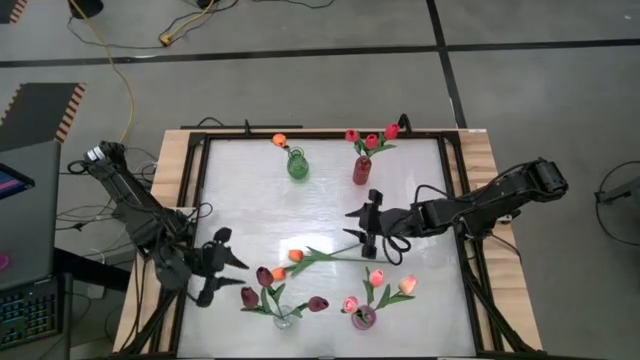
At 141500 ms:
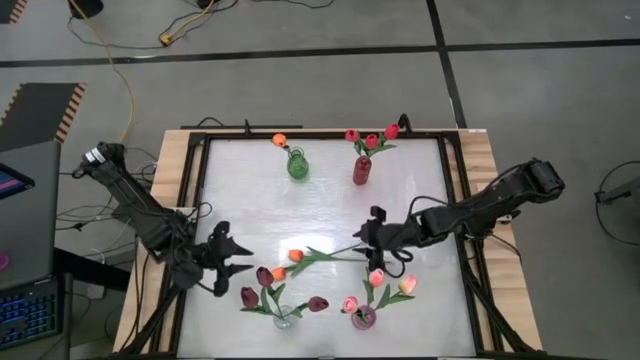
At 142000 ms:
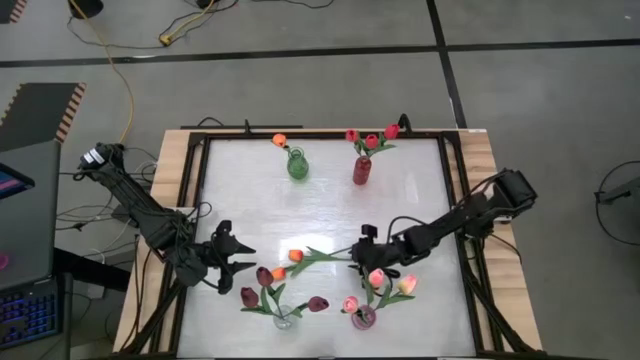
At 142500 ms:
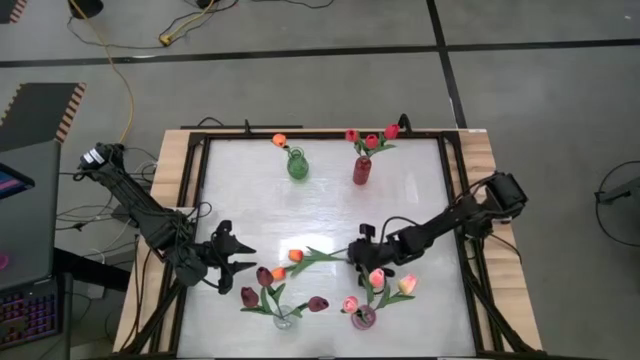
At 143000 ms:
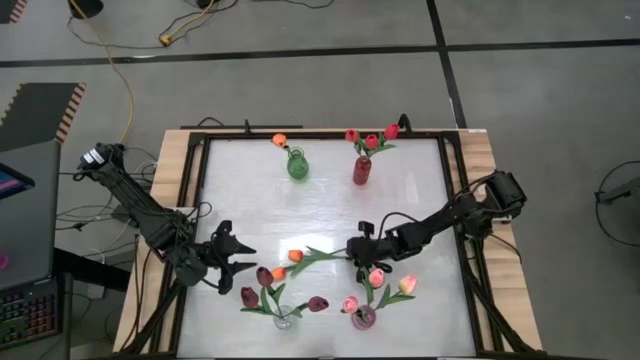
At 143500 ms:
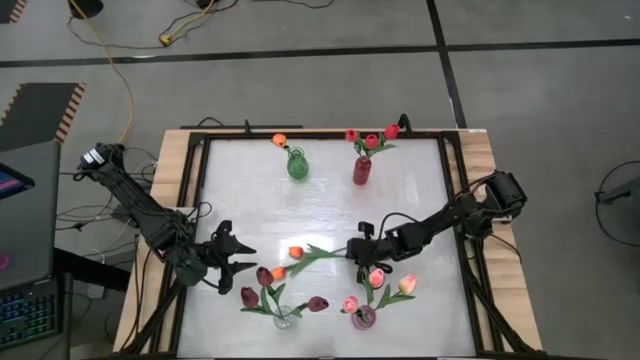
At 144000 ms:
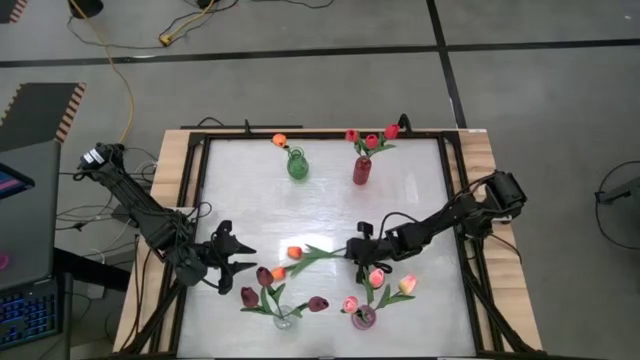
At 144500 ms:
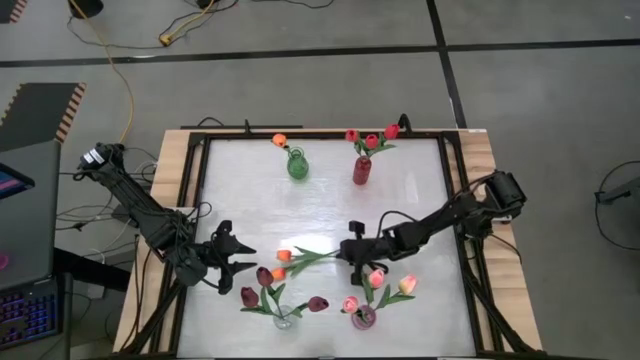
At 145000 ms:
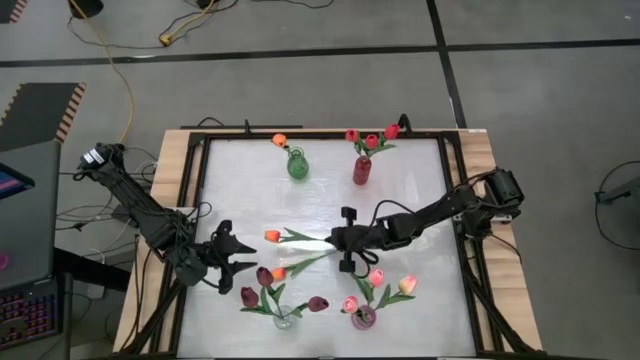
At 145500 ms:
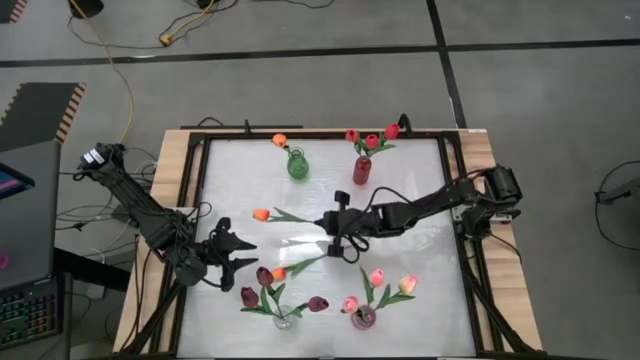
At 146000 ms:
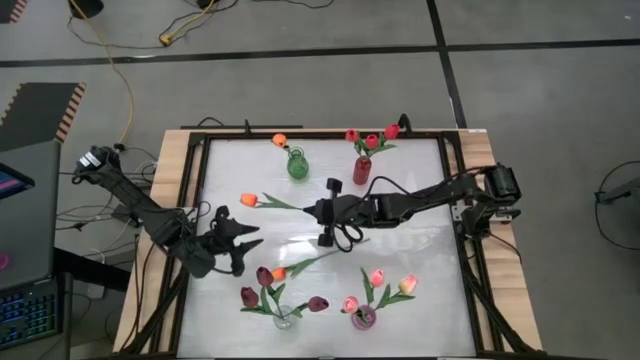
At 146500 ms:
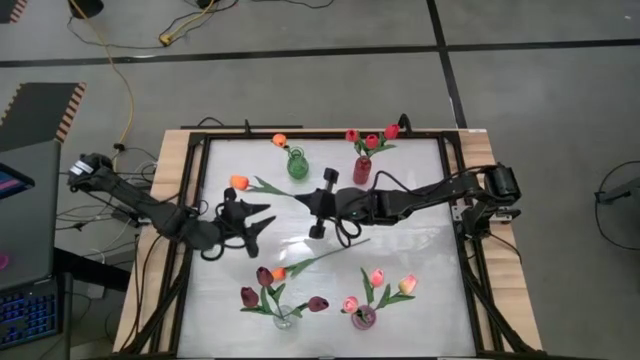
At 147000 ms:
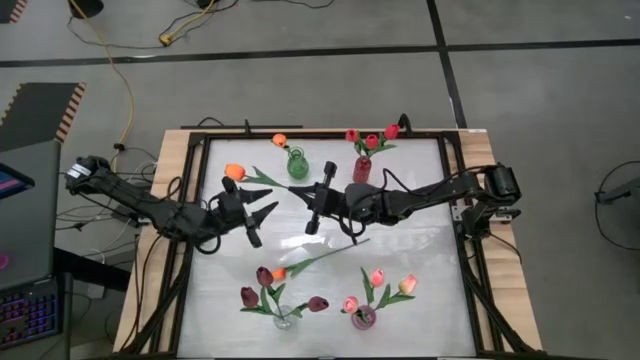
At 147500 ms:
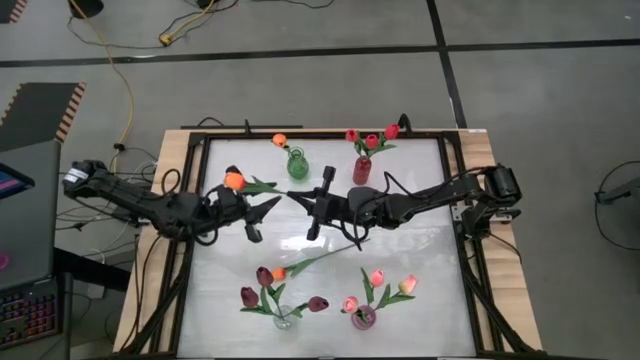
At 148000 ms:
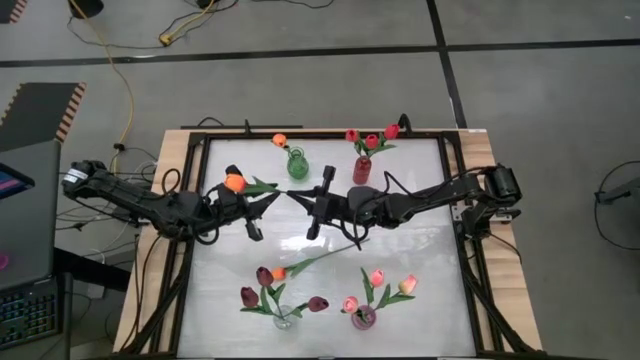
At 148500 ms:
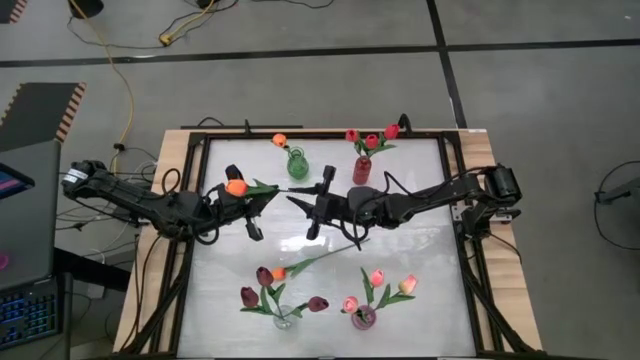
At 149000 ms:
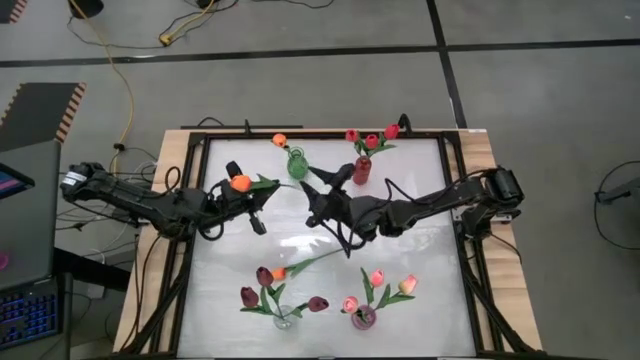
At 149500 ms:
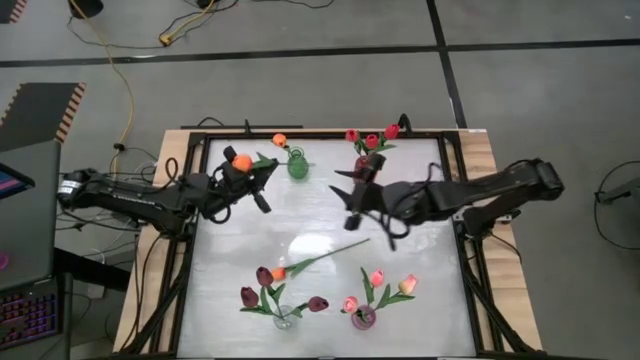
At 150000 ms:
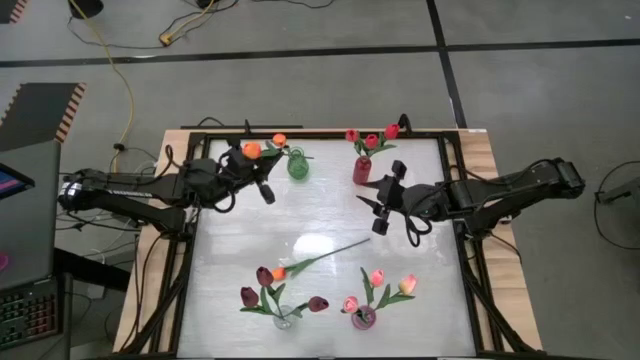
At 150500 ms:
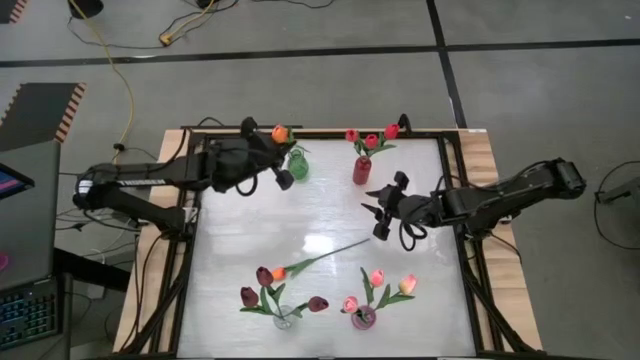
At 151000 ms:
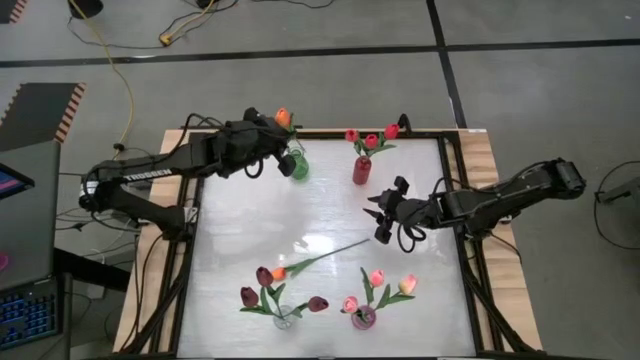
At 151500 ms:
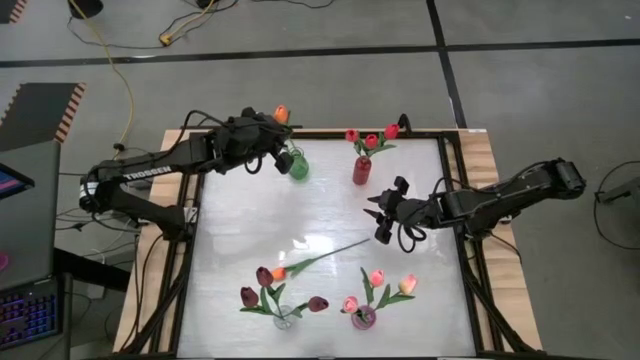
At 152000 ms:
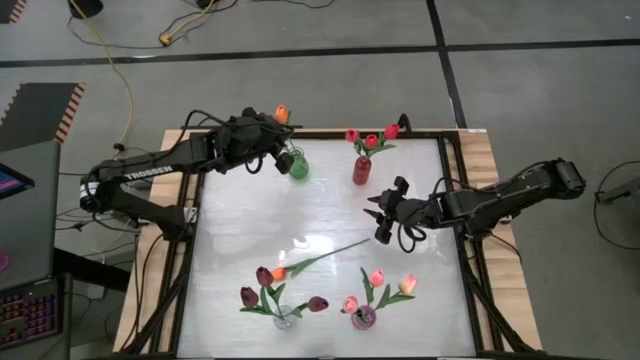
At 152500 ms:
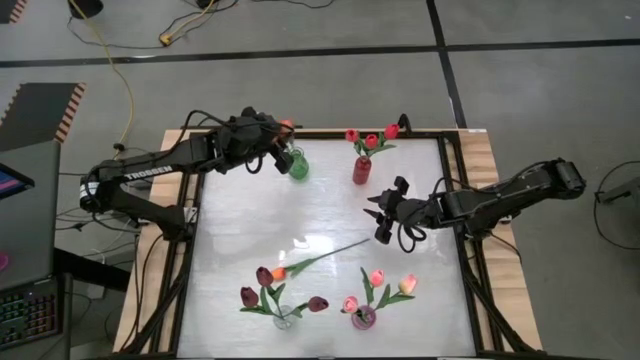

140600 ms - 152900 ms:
Task: Sort flowers into vase by color
Put the orange flower into the green vase

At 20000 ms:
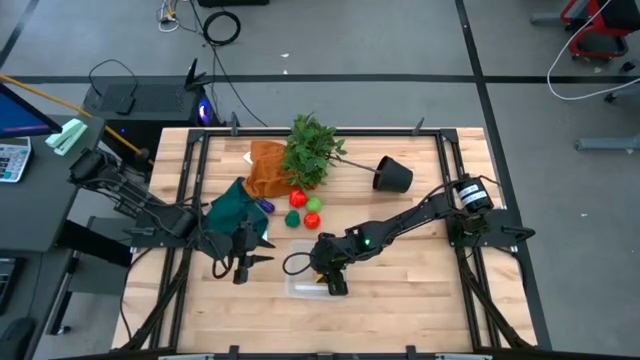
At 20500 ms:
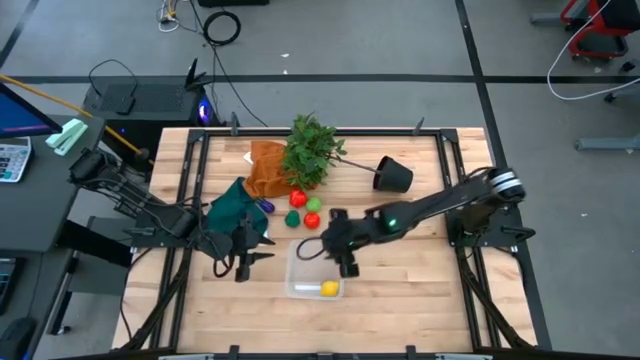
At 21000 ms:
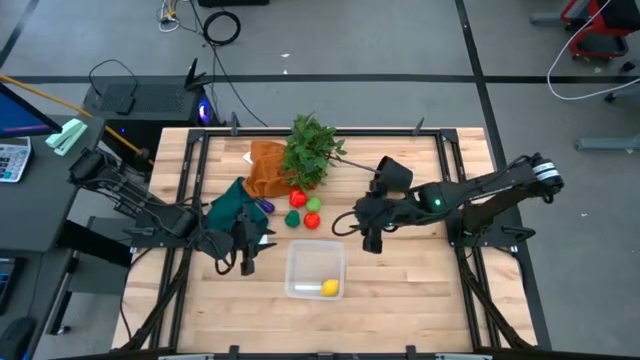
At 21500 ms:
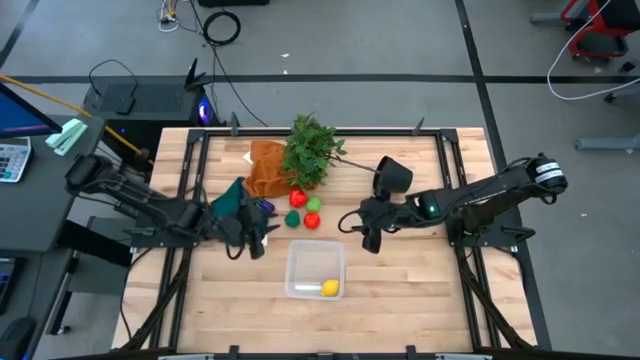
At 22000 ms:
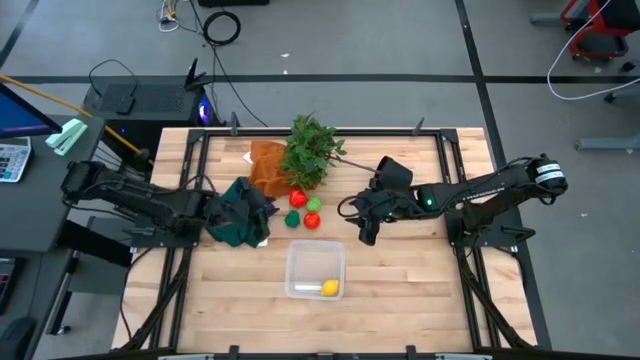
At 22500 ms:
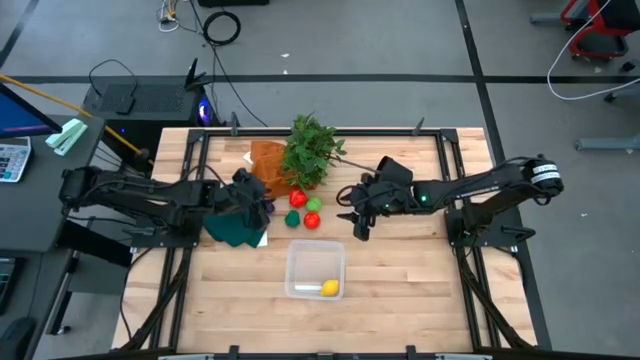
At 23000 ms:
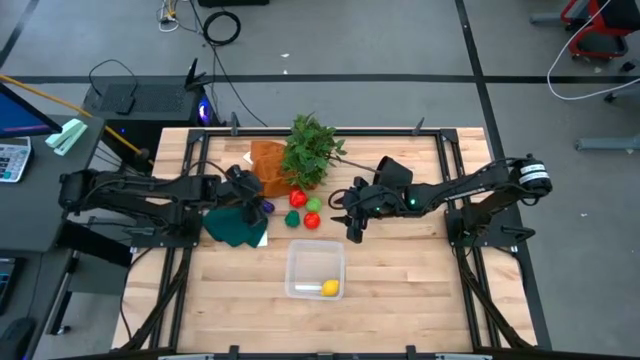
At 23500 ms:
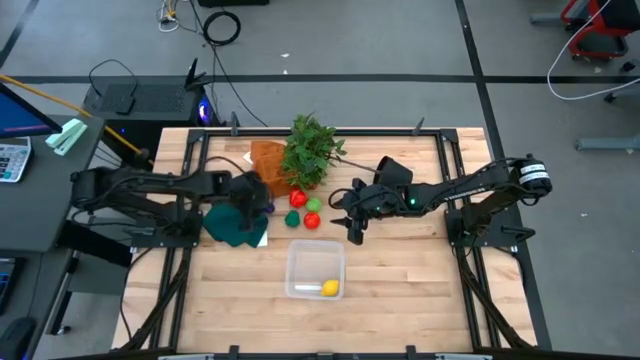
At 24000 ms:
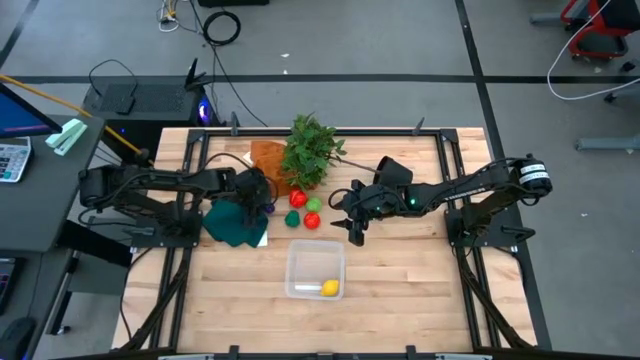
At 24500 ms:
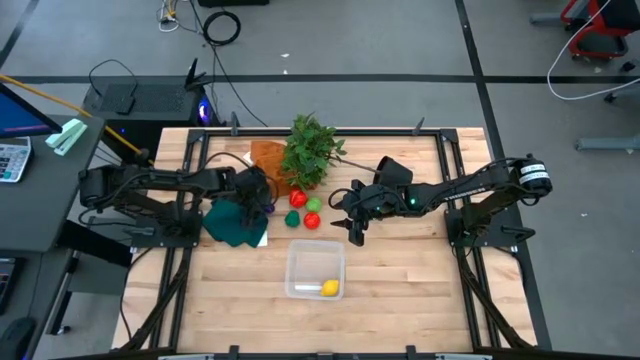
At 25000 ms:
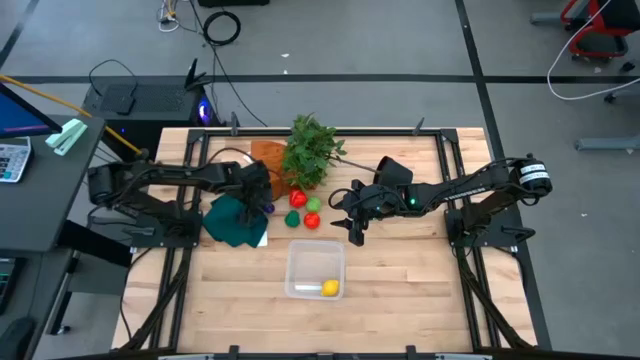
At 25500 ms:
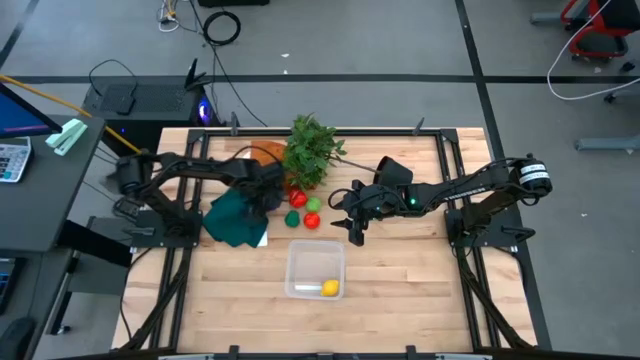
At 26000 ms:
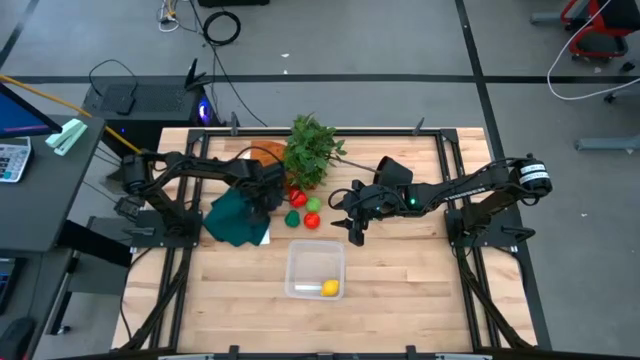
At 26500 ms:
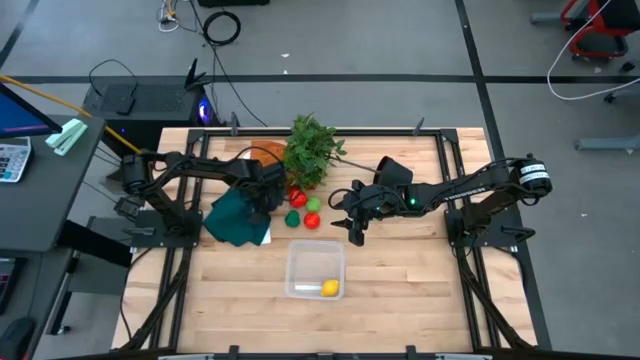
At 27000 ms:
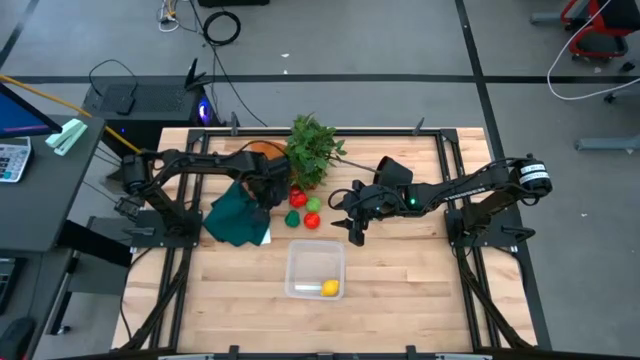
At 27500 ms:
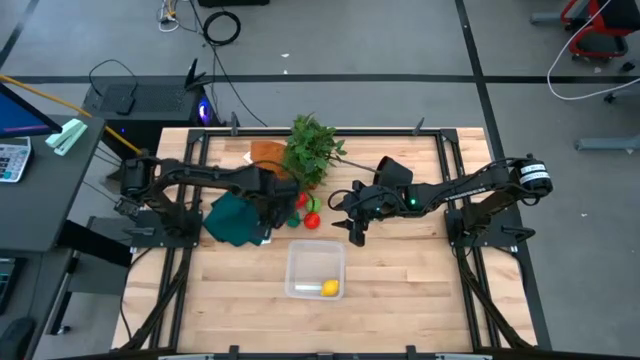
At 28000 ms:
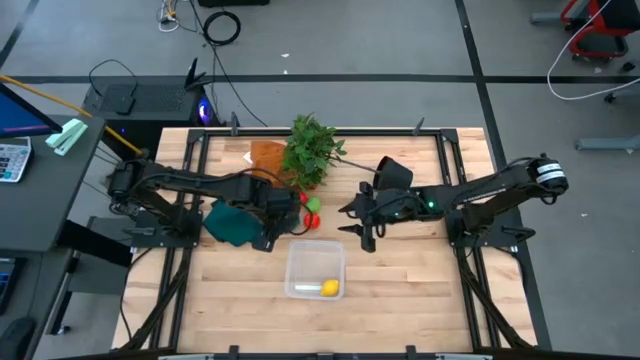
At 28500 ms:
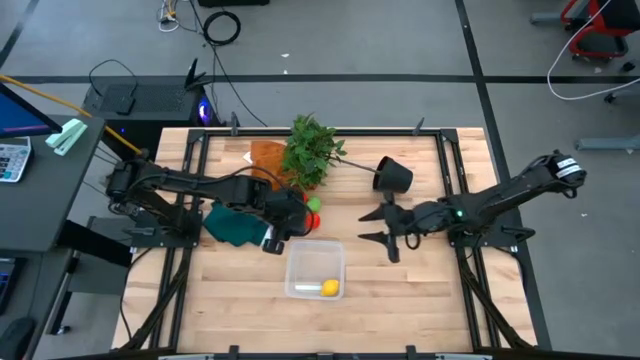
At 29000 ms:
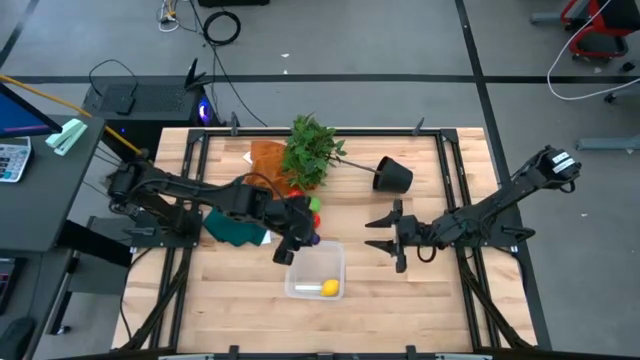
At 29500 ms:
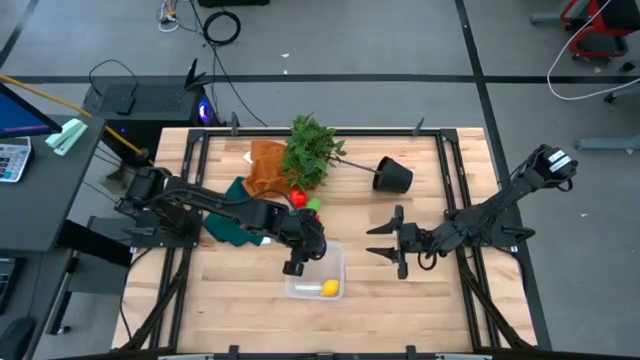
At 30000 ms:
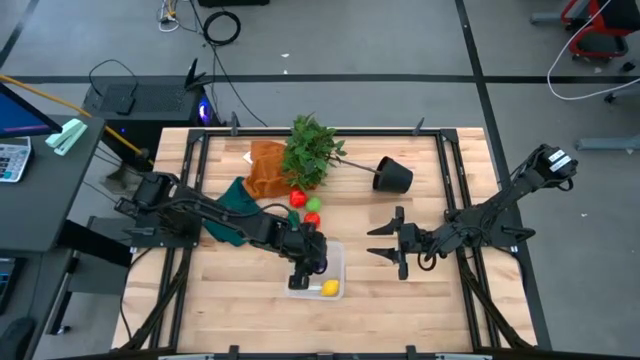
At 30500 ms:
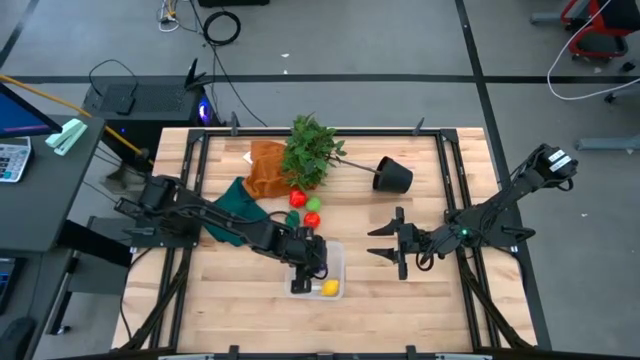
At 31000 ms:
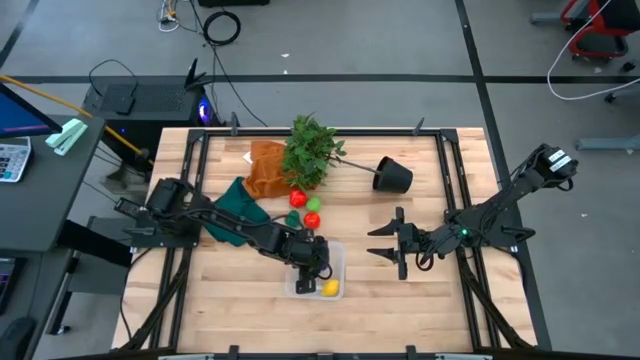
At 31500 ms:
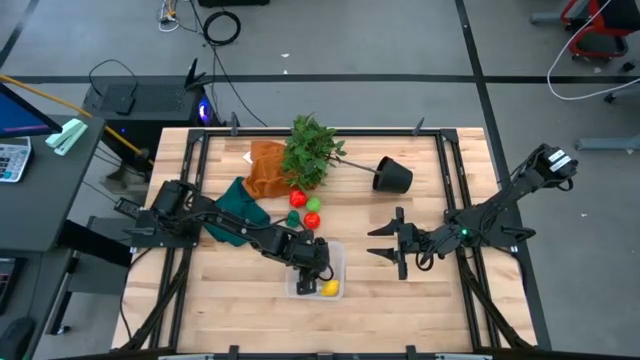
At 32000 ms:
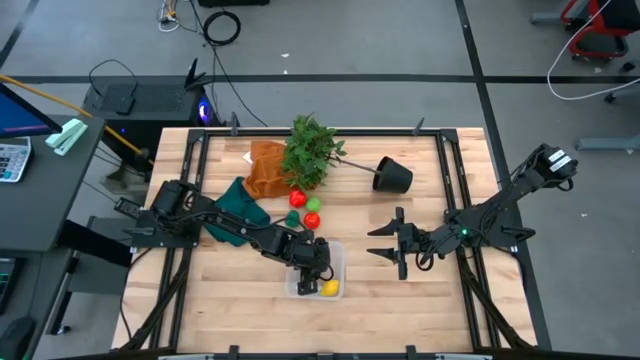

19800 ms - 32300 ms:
Task: Pick and placing Produce into tupperware
Put the purple eggplant into the transparent bin
